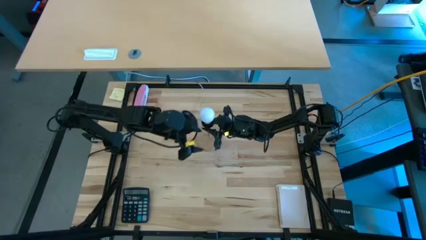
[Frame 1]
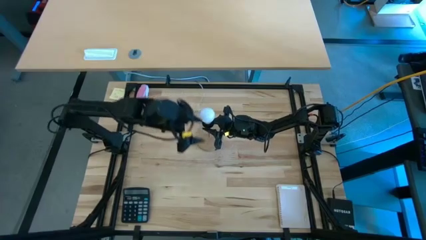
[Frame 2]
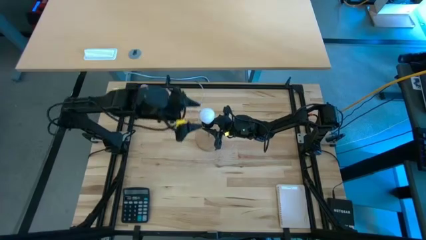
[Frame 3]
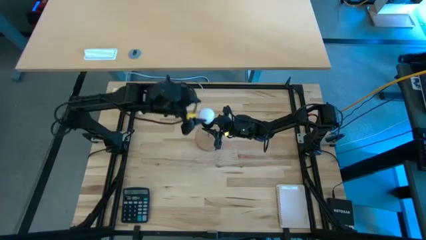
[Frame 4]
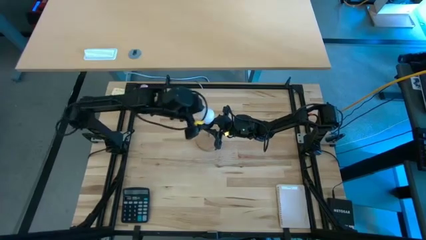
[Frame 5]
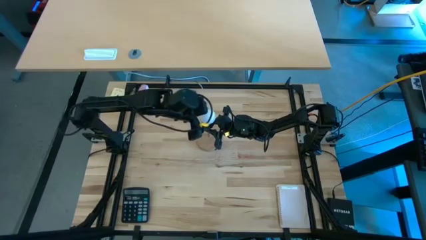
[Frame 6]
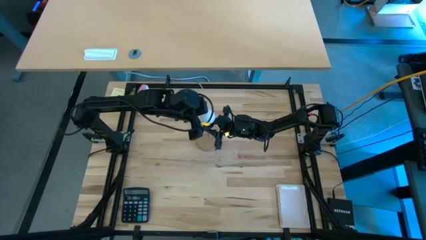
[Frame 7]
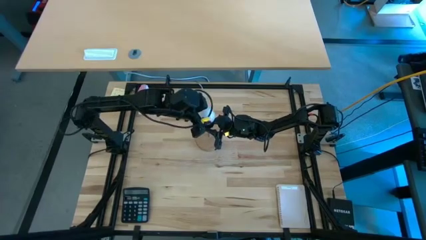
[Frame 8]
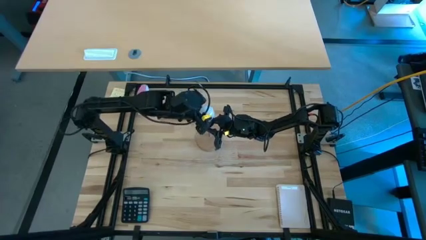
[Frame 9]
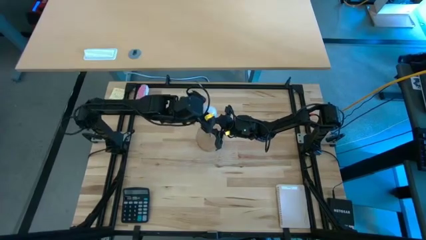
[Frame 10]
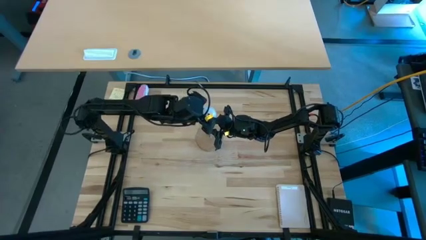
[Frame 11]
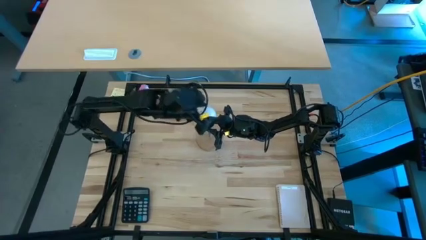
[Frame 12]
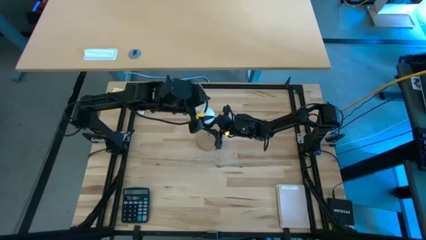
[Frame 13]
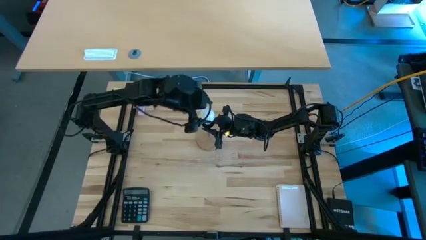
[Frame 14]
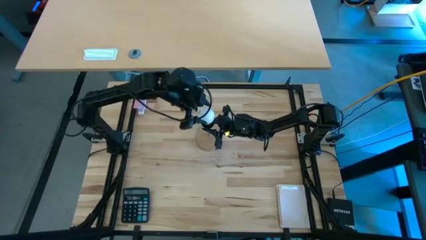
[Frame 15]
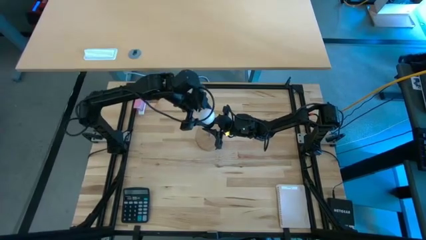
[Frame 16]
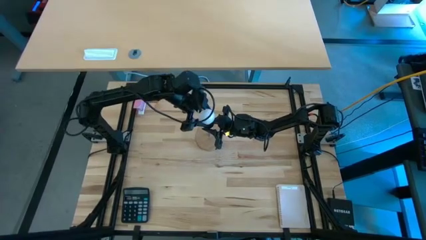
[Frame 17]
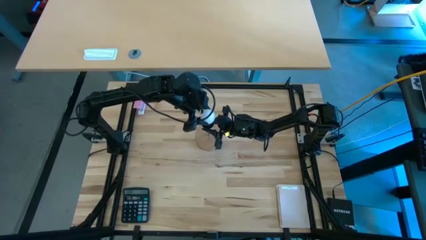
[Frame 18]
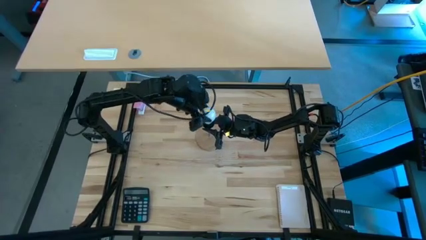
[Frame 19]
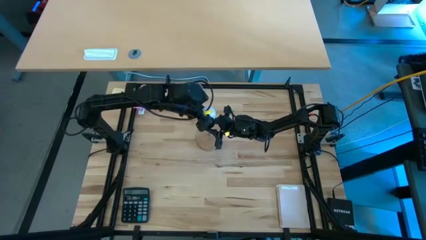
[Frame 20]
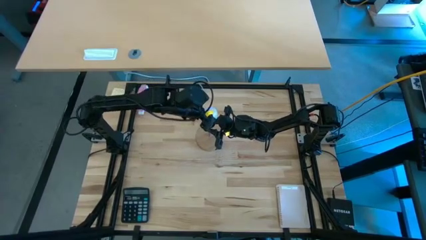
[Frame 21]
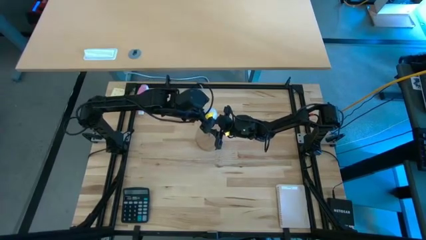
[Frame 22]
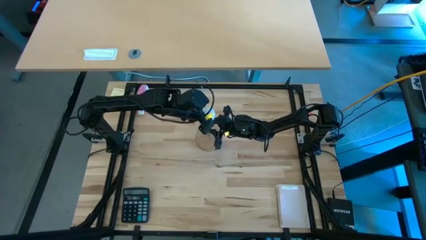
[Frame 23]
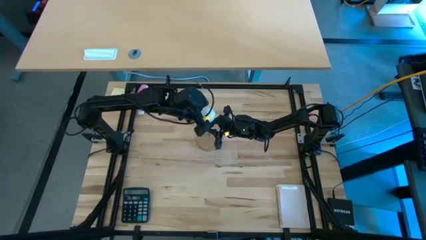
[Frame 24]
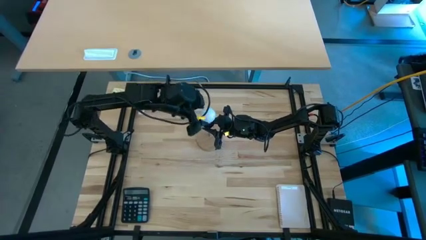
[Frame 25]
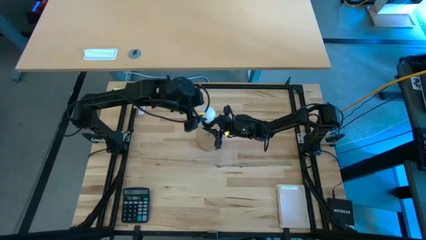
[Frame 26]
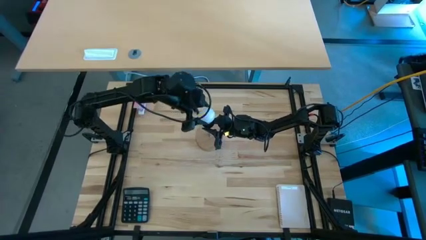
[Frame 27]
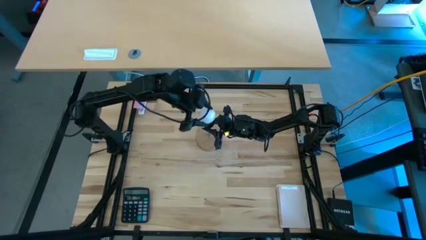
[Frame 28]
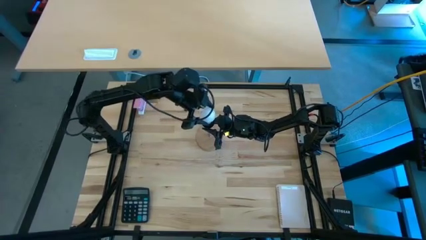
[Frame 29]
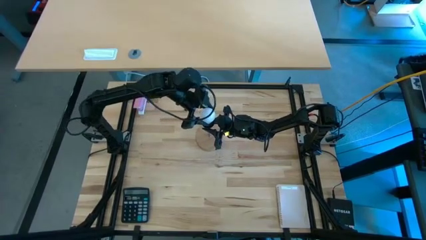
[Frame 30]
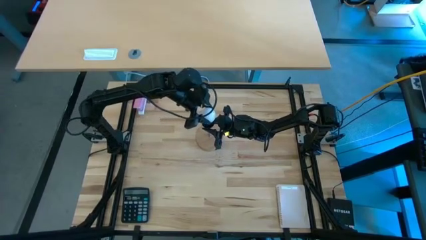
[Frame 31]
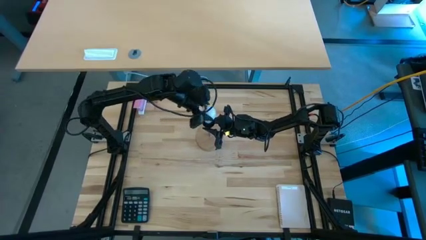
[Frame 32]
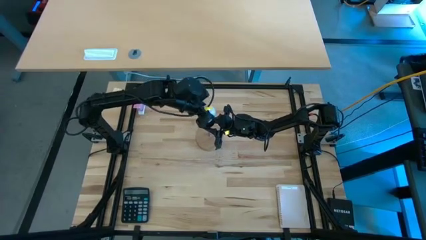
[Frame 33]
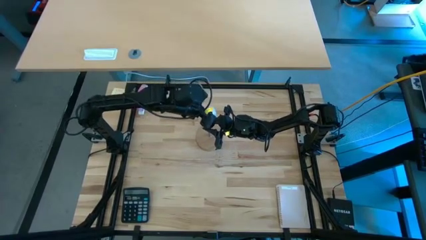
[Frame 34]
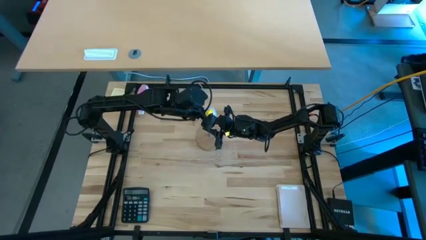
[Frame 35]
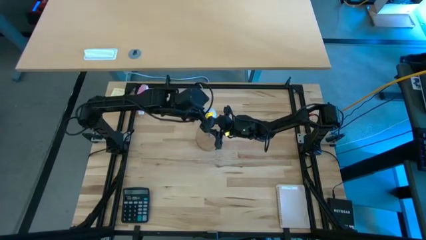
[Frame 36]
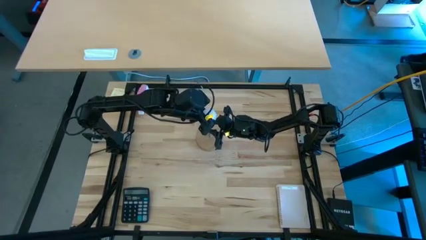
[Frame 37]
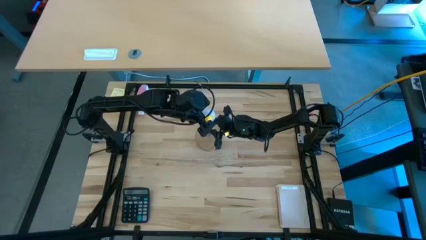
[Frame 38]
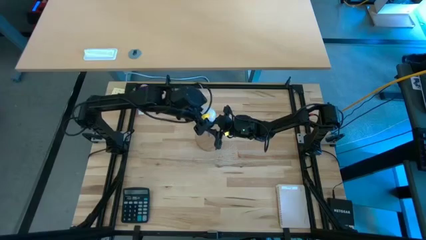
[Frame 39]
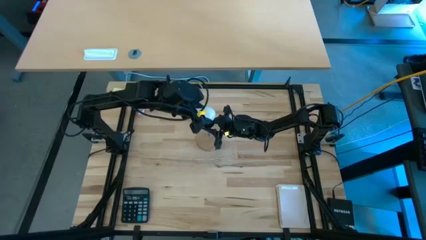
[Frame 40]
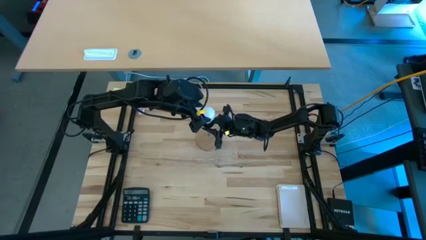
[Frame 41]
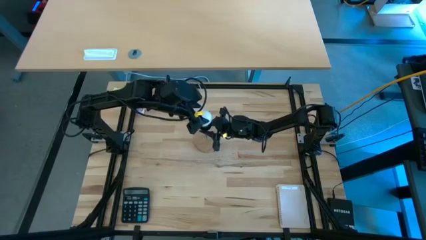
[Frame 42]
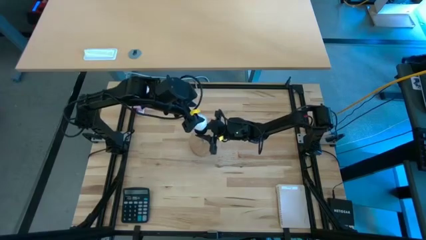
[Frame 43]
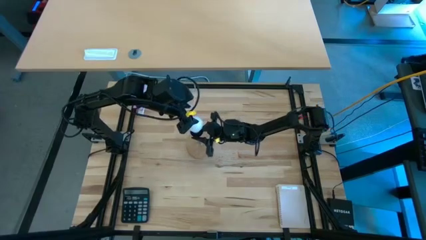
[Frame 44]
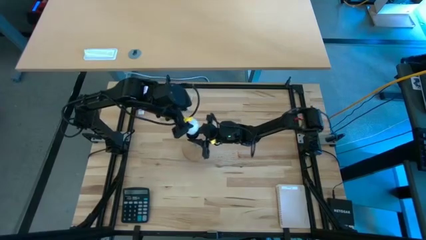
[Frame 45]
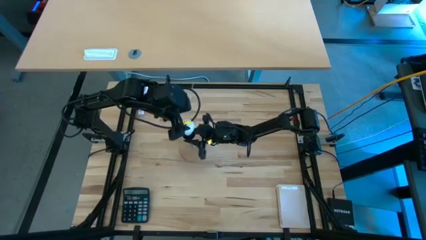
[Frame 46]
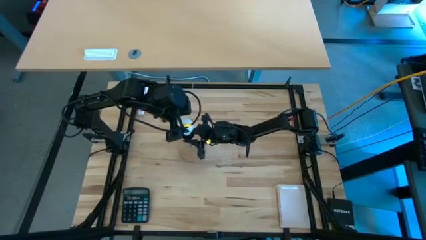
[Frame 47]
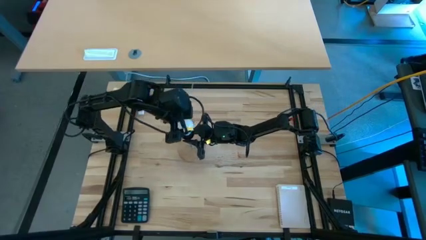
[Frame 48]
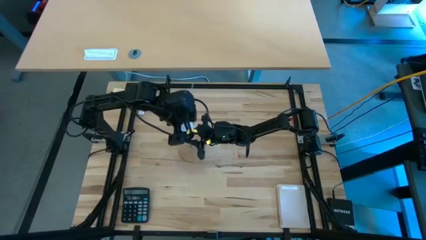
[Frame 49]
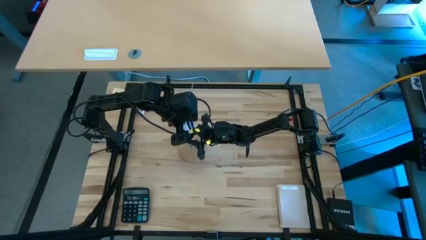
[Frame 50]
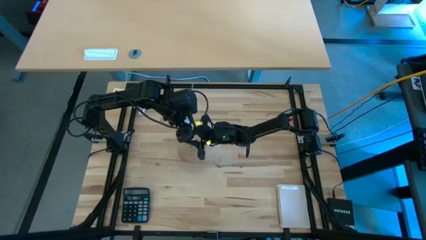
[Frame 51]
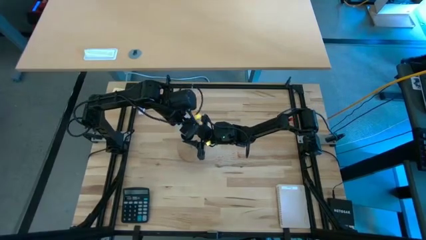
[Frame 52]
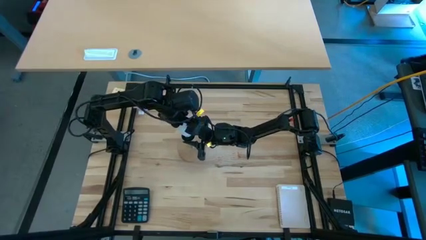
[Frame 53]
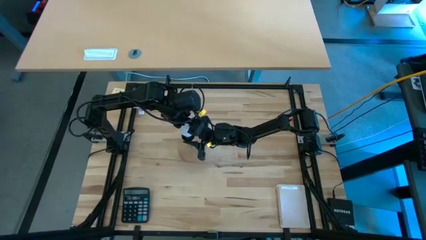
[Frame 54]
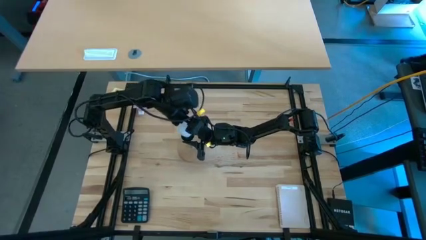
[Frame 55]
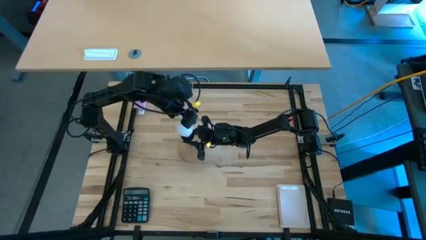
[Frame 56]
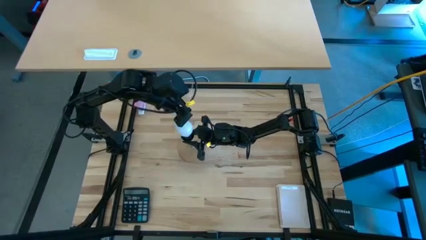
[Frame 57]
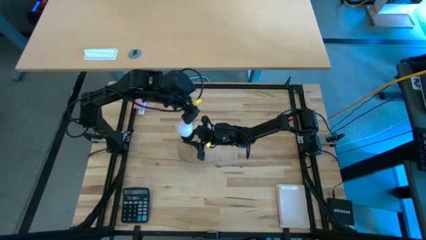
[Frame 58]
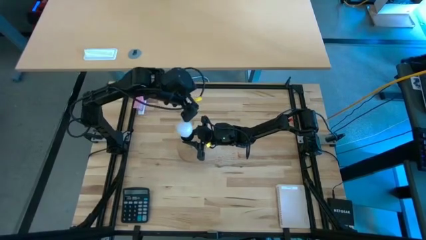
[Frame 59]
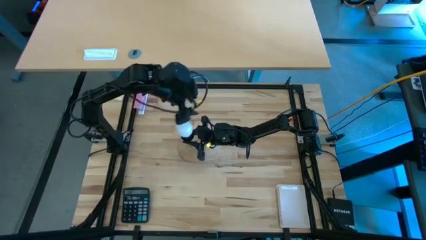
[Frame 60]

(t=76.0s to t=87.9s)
Task: Screw lightbulb
Remove the lightbulb from the lamp
